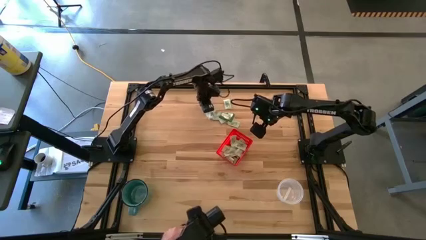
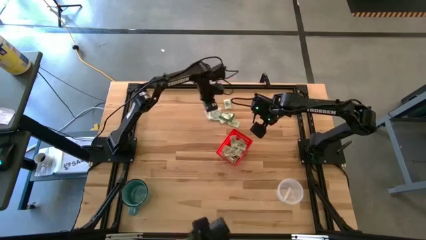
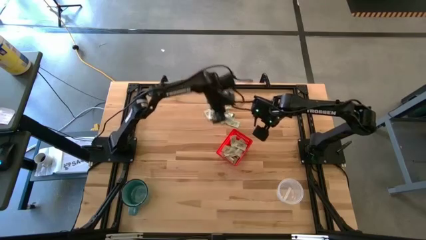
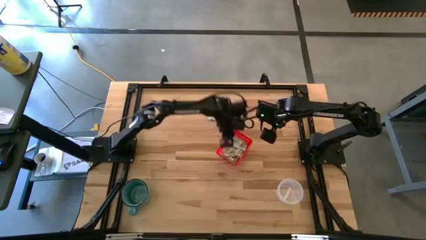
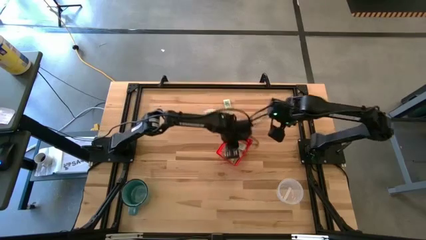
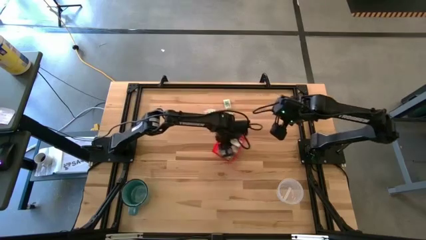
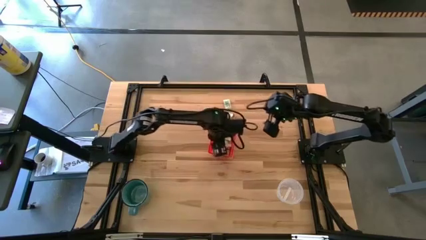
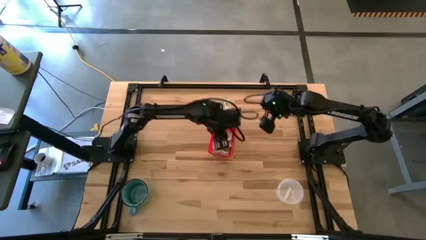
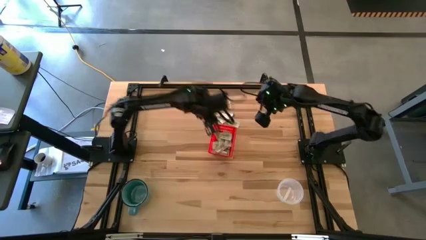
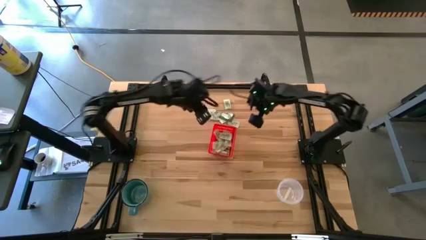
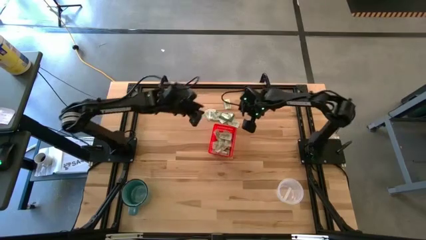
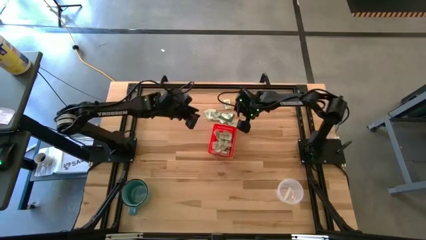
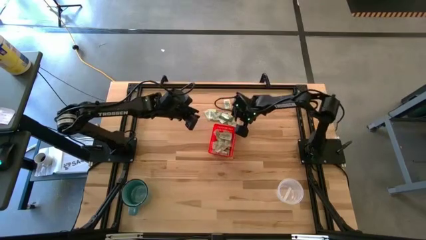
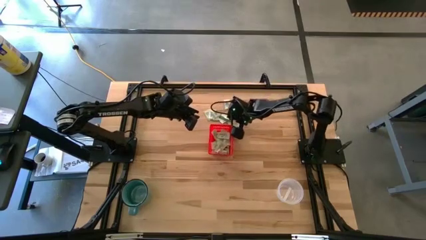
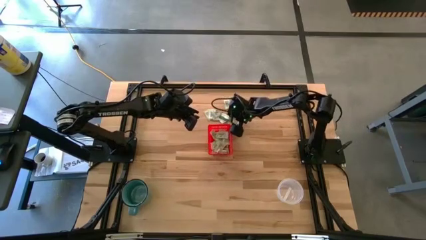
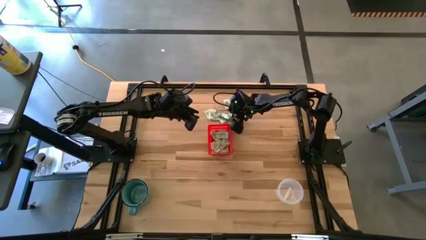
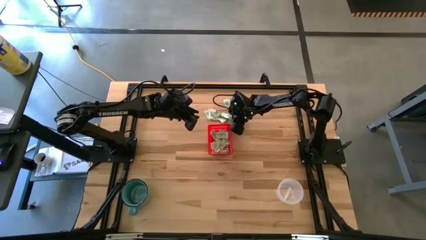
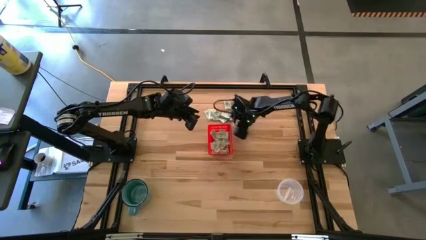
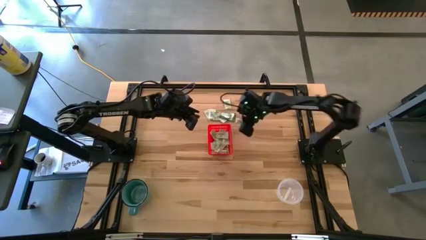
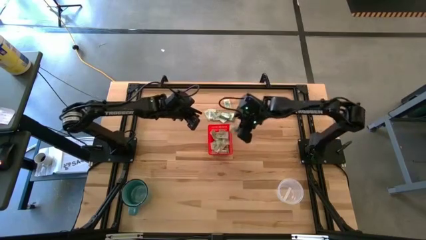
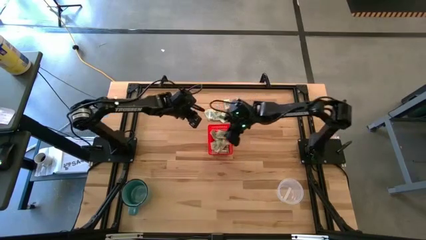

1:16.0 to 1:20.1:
Task: Pick and place items into bin
Put the white stevia packet into the bin

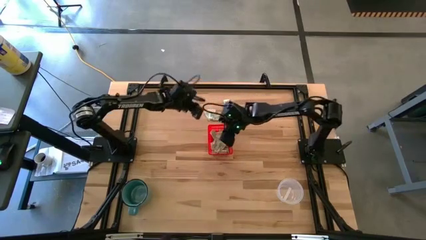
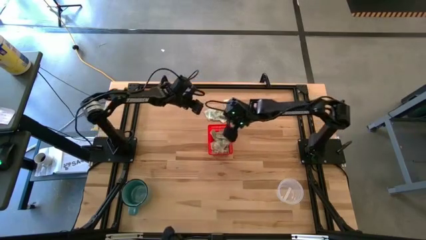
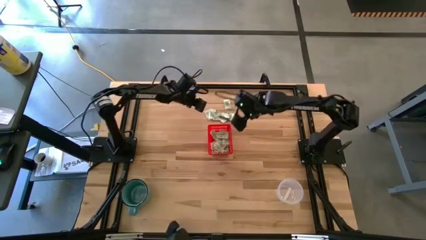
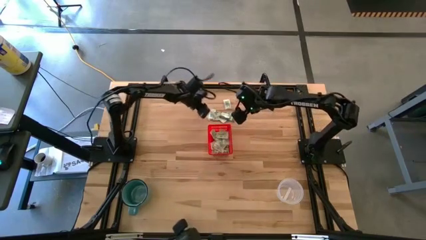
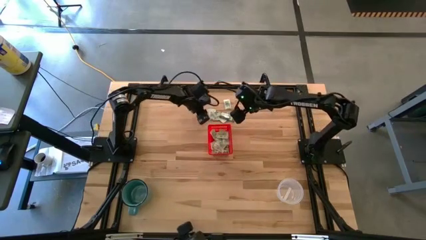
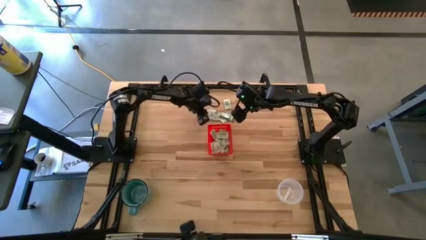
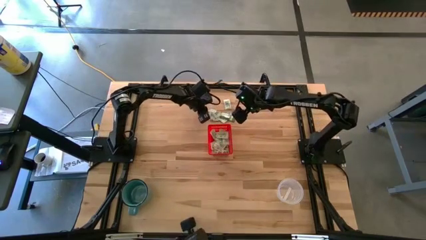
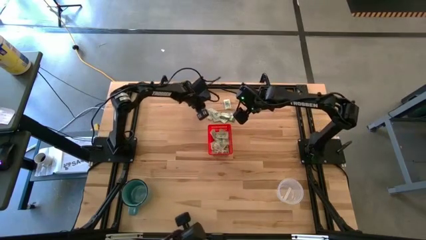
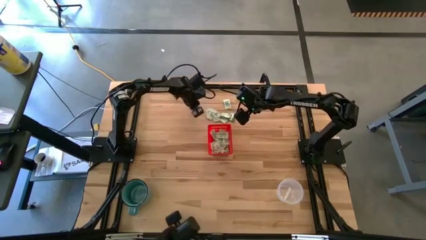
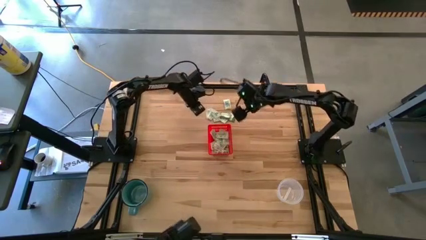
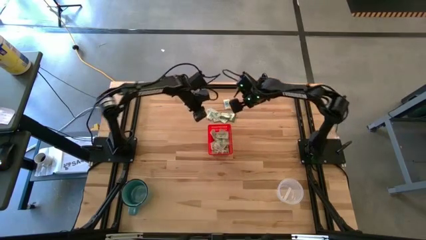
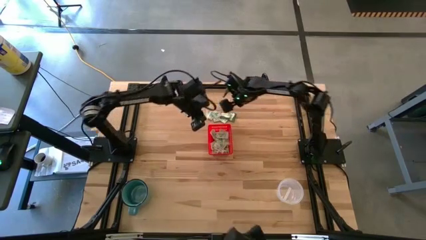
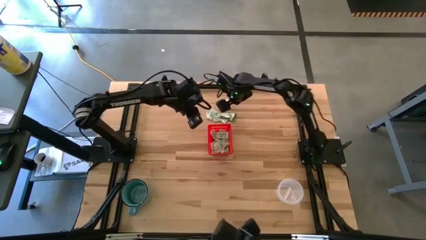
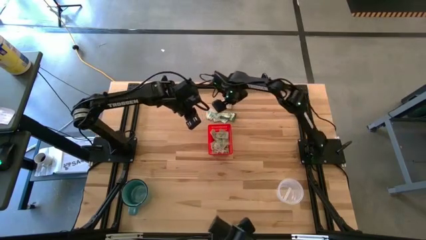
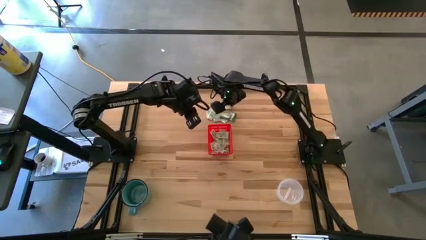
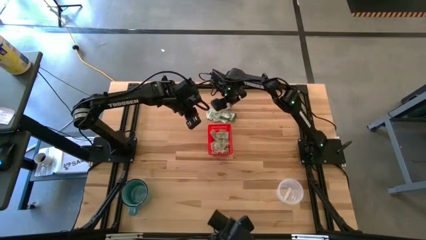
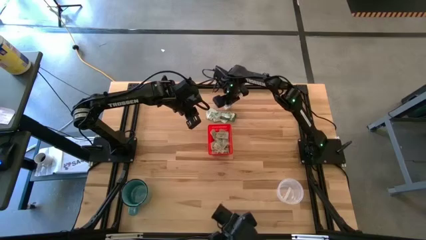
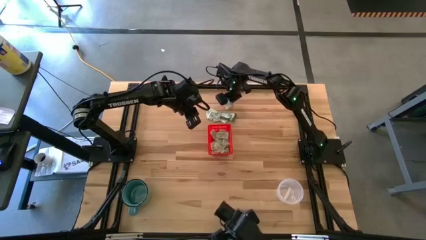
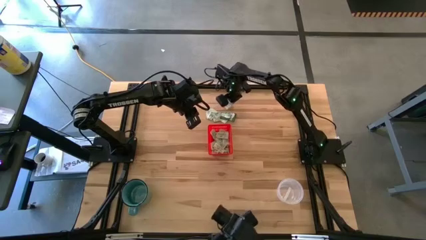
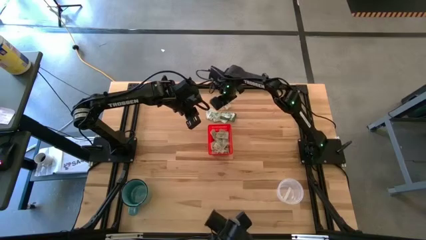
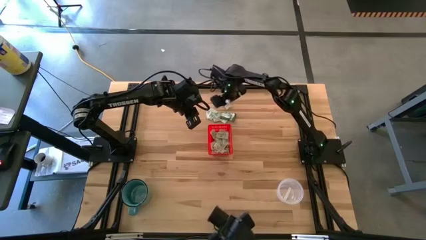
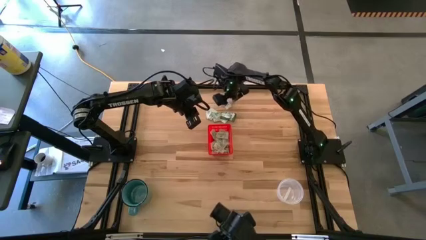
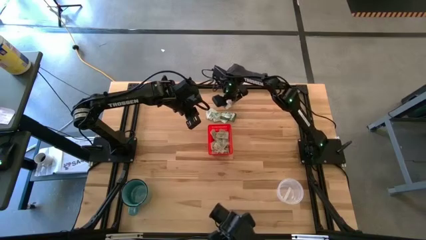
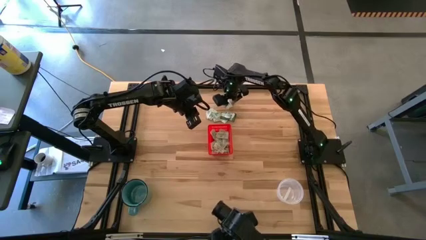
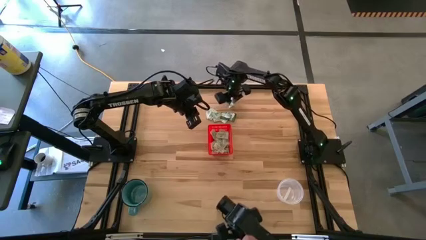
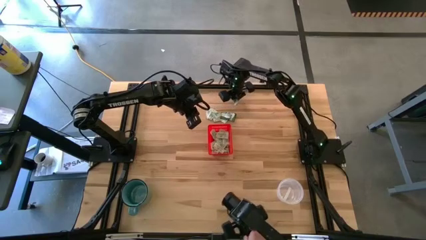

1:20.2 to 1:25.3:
Put the white stevia packet into the bin

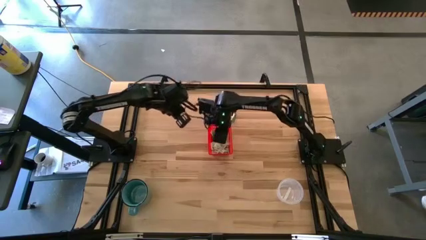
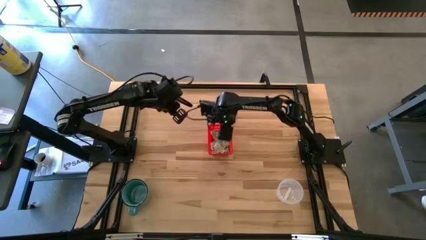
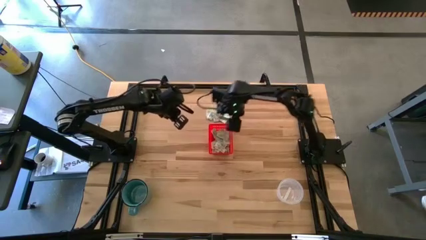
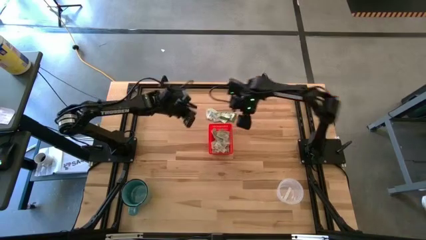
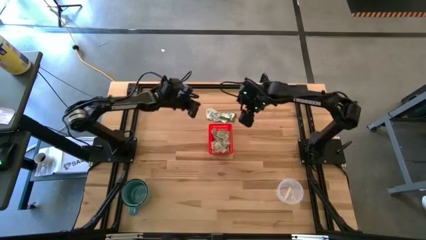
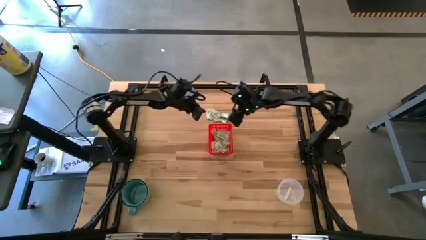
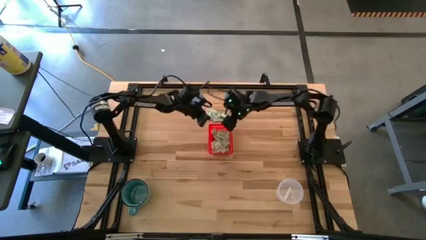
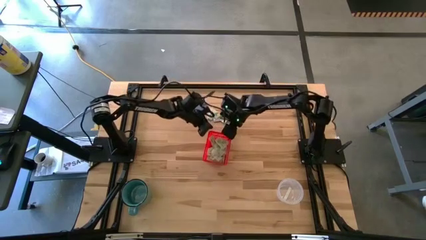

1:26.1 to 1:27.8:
Adjust the bin on the table

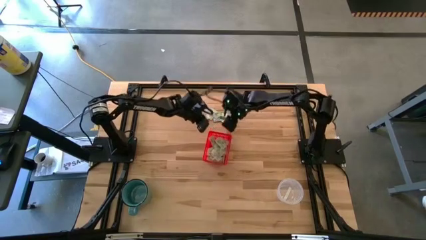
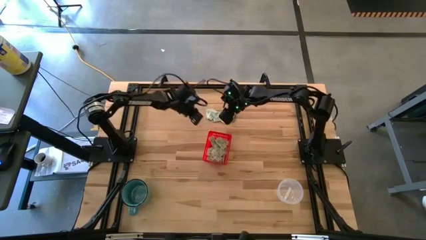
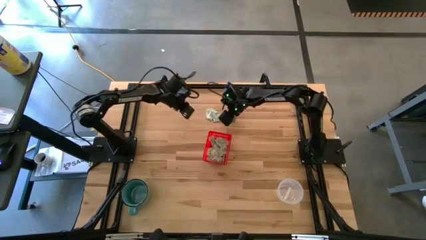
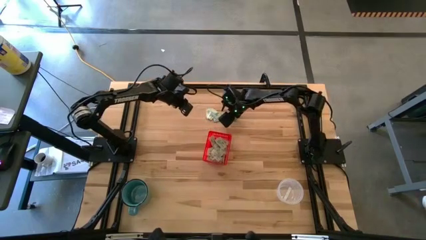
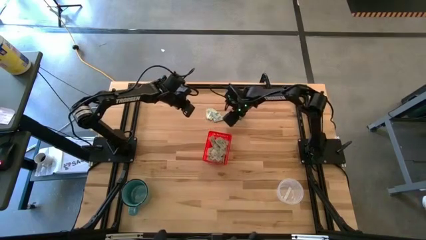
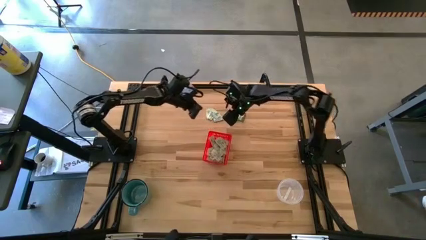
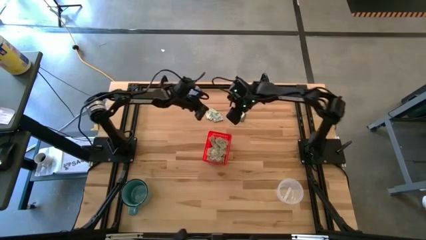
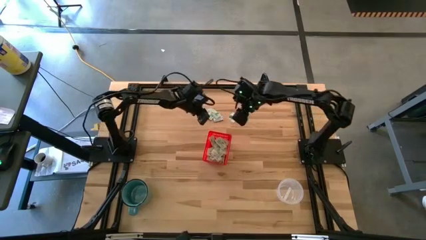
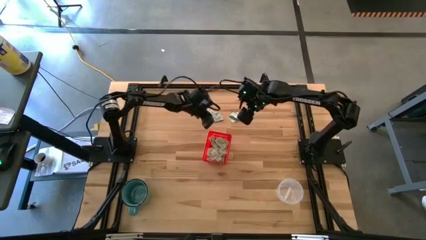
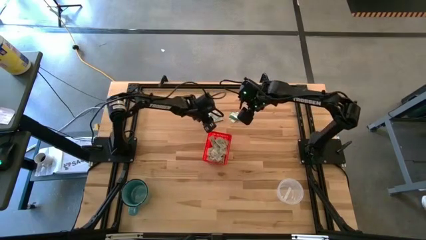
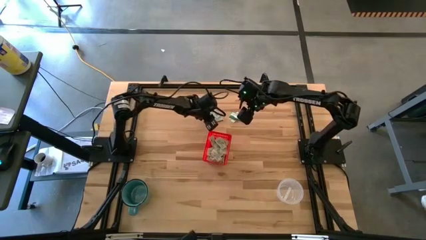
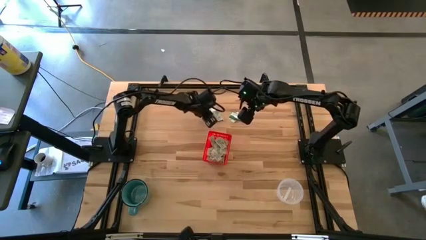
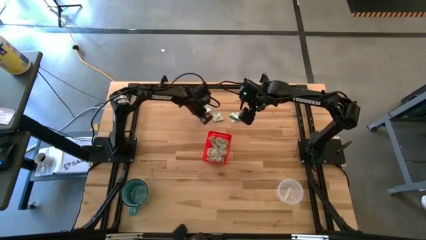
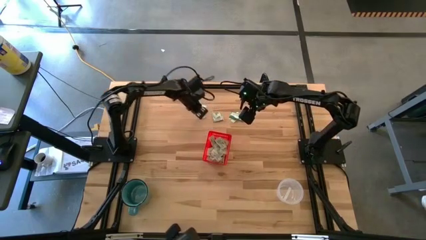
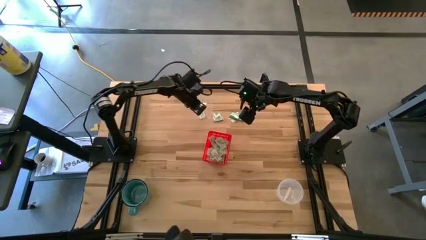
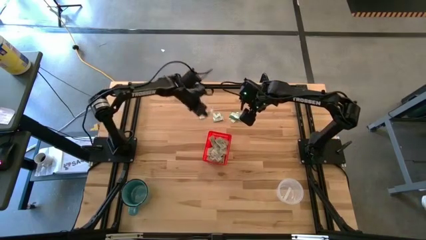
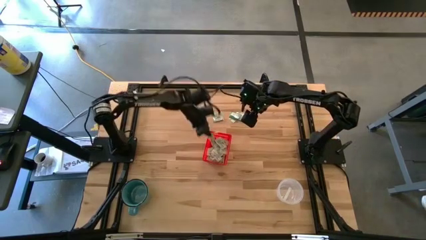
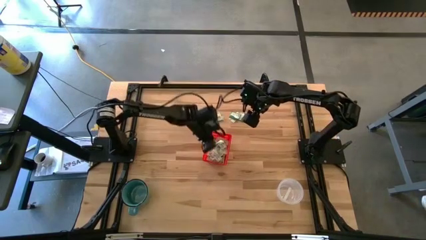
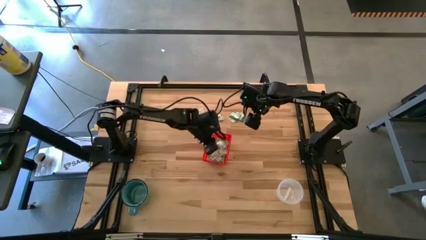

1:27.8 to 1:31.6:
Put the white stevia packet into the bin

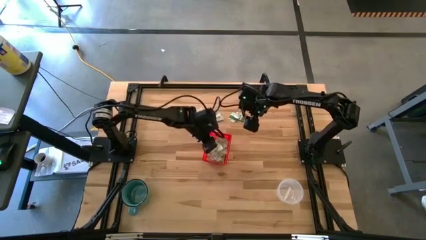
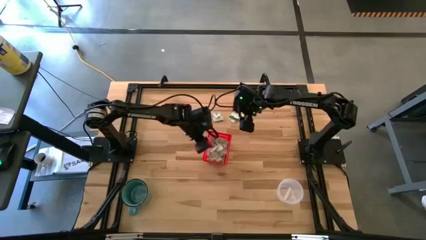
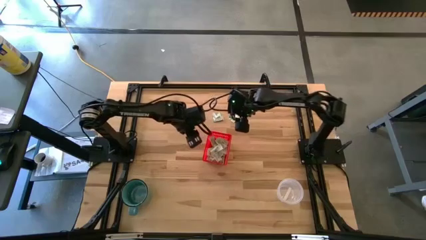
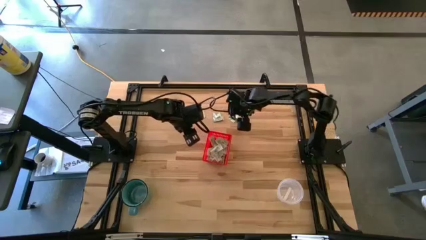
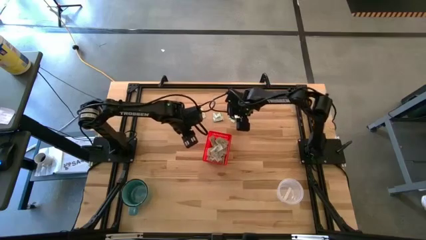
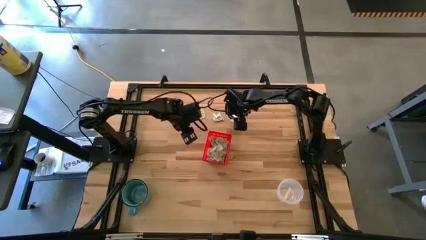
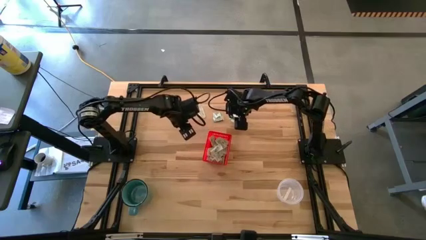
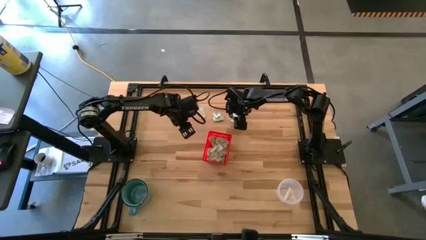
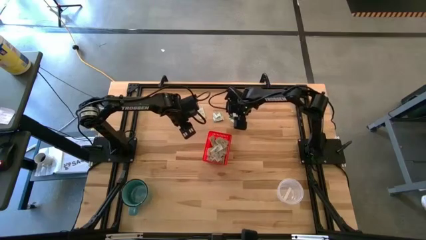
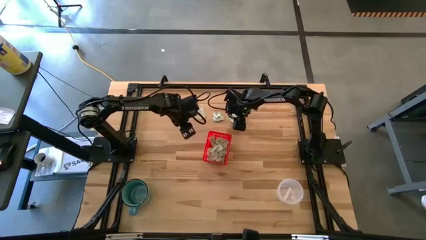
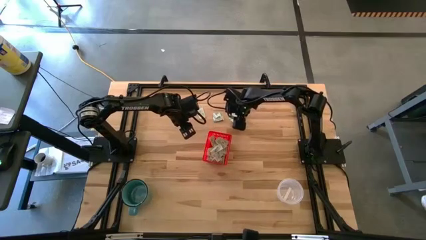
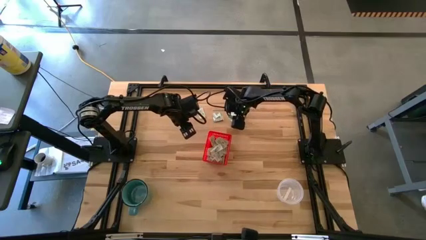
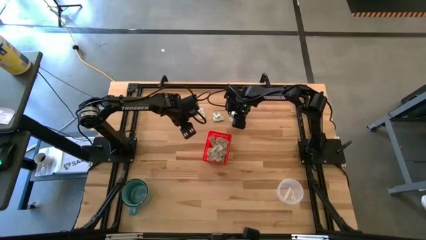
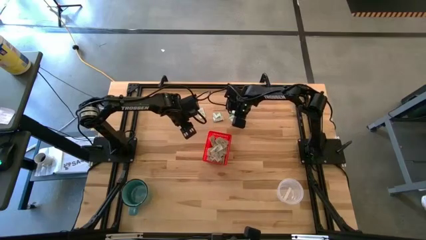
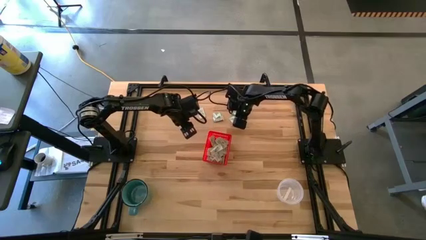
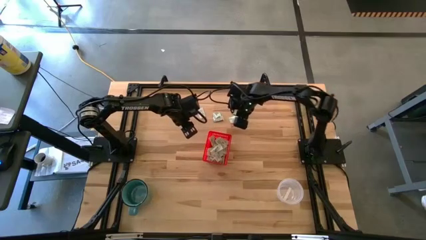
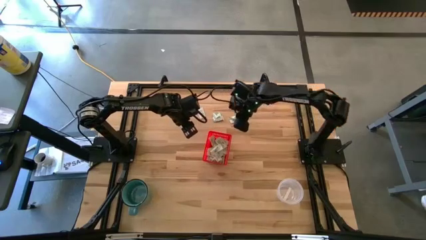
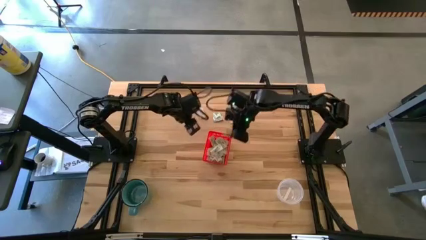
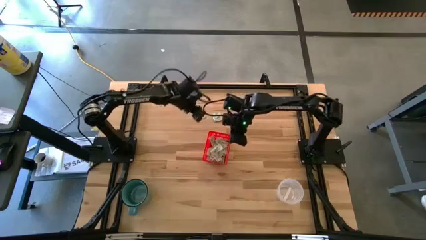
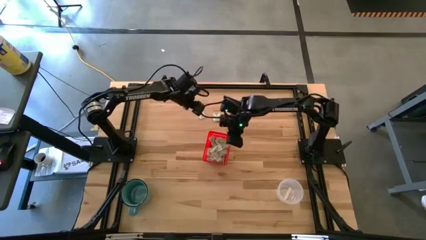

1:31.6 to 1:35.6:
Put the middle green stevia packet into the bin
